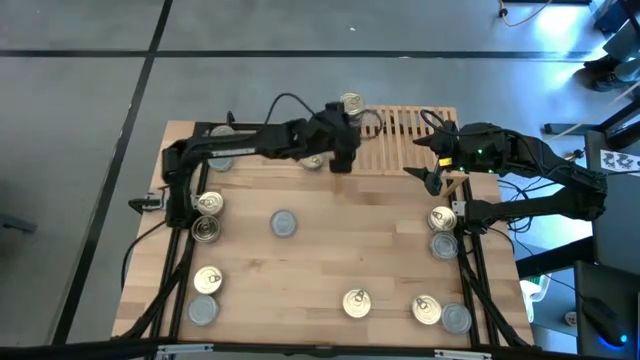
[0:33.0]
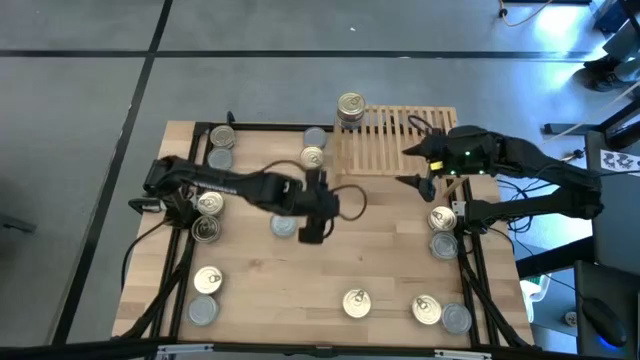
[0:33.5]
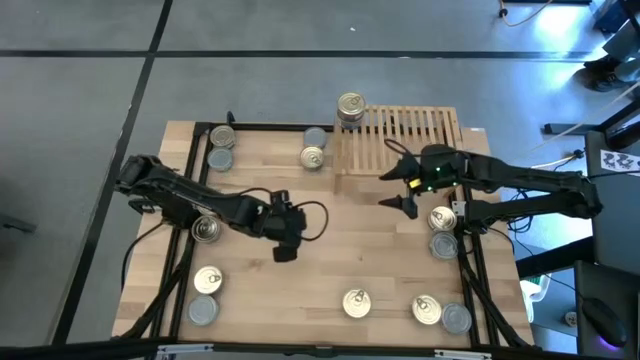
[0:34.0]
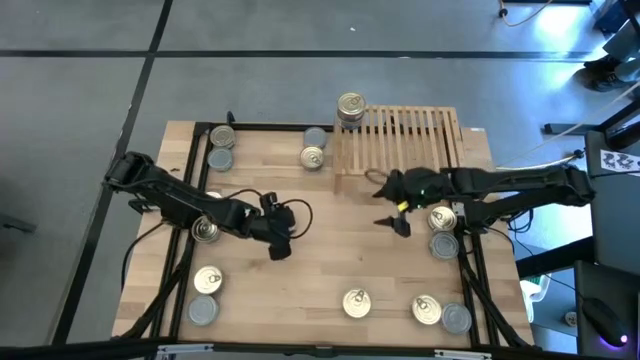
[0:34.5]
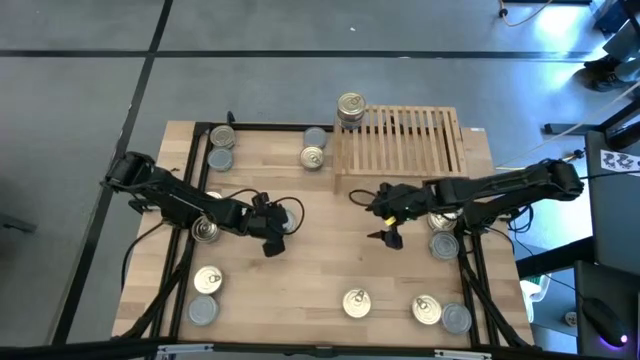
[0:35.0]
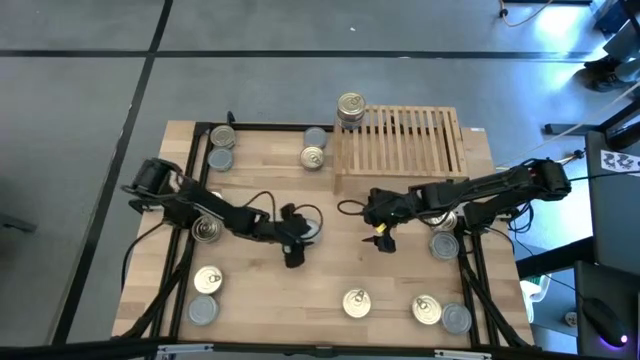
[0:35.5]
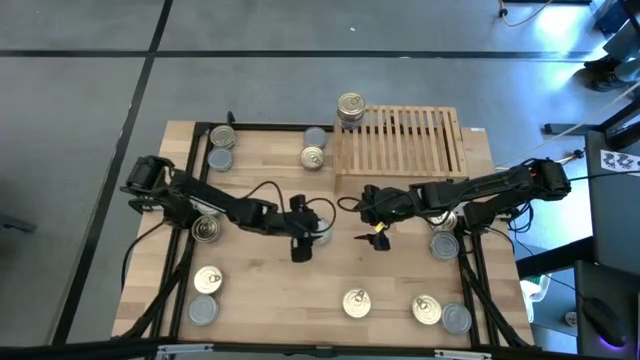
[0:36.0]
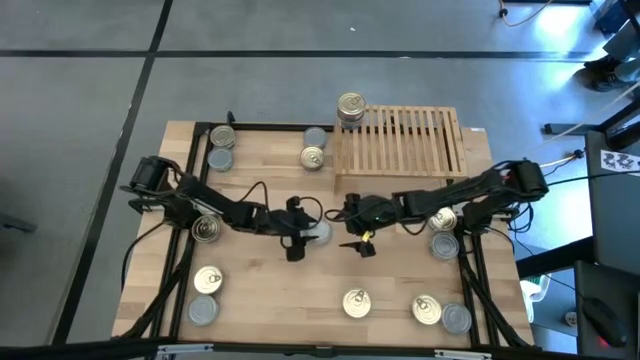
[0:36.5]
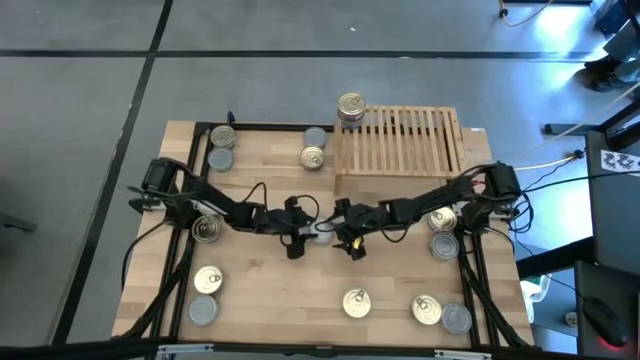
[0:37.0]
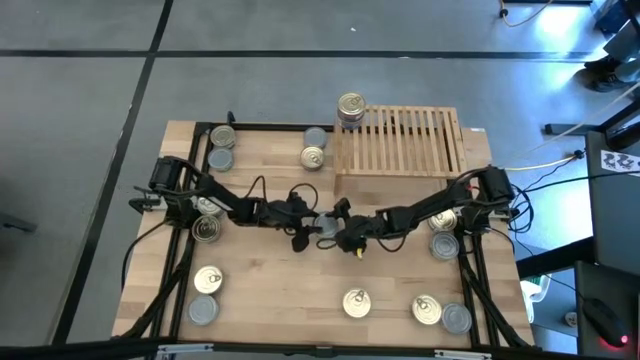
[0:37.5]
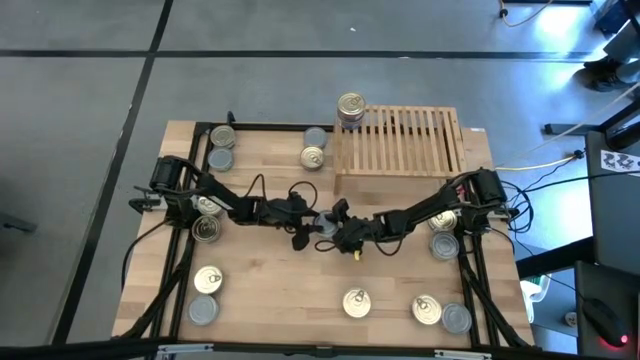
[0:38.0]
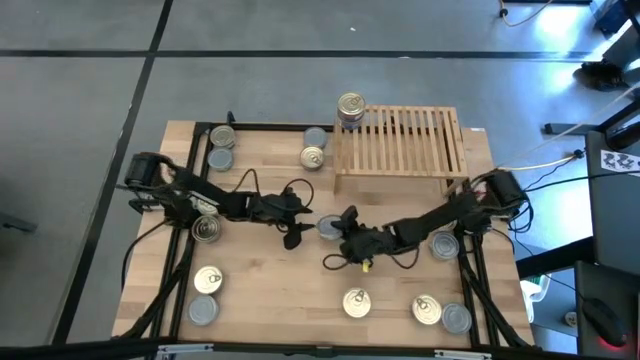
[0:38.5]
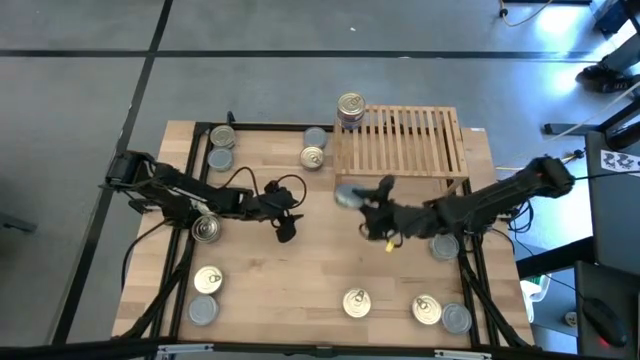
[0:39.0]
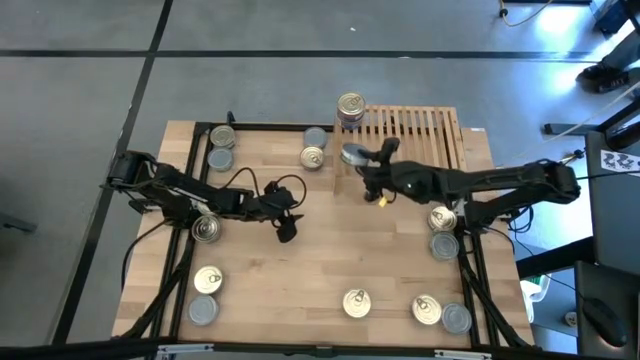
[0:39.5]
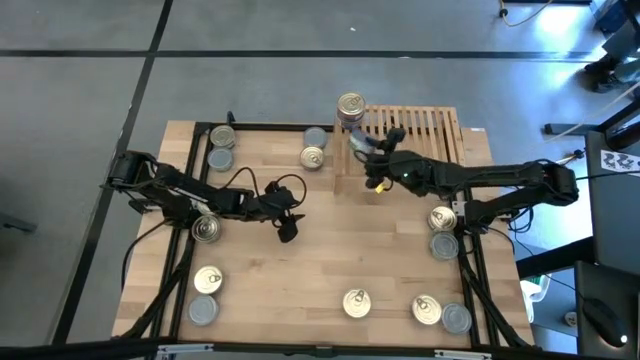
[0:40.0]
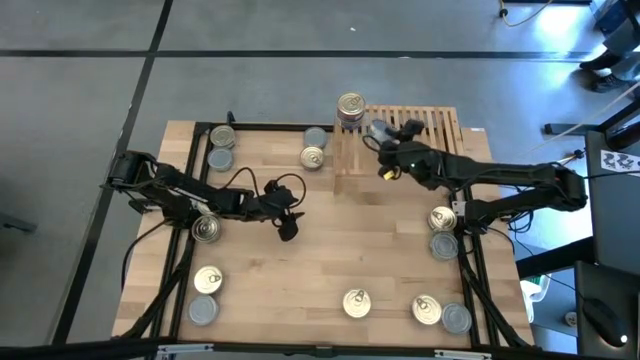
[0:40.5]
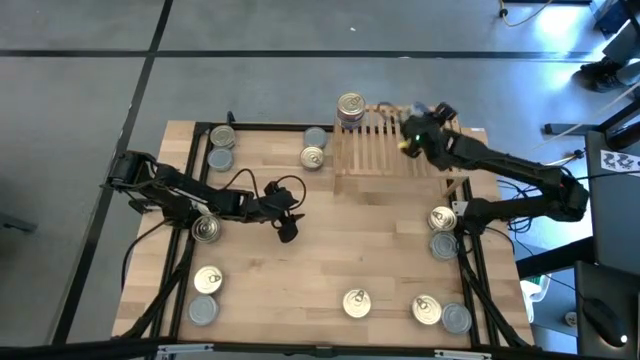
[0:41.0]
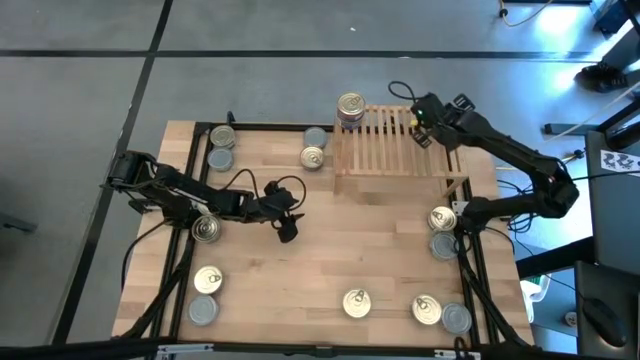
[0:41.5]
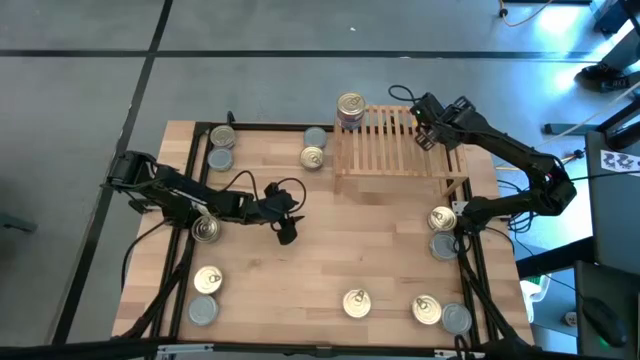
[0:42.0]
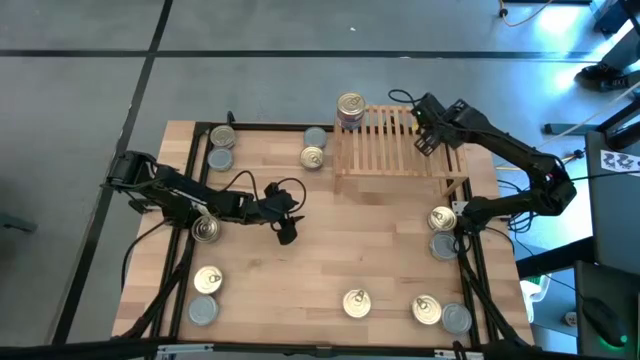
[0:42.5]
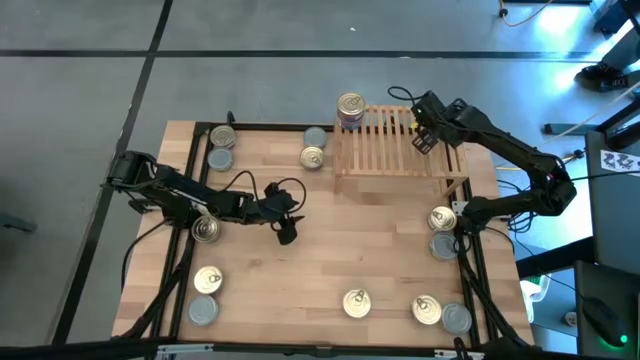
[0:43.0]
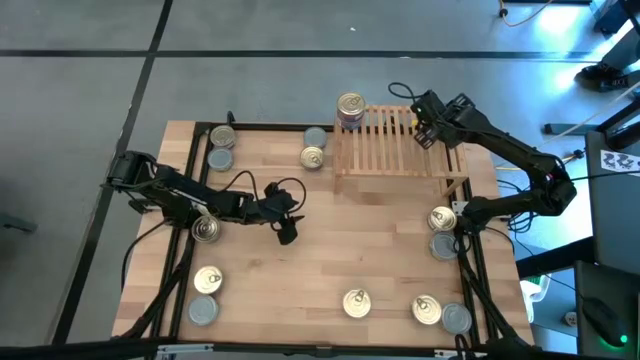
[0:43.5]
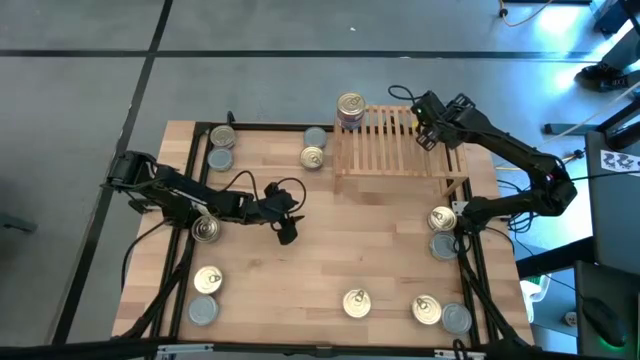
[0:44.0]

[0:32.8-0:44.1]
Task: Stack canned seafood by type on shelf
Put the green tuna can on the shelf

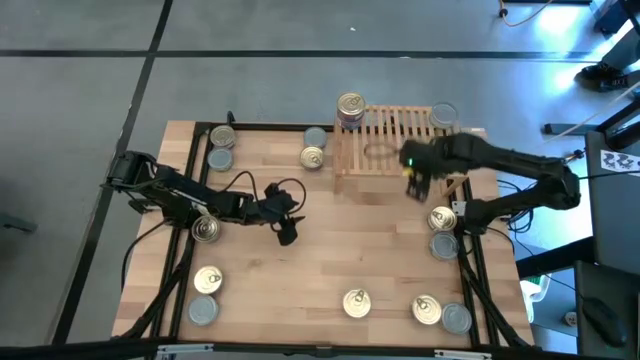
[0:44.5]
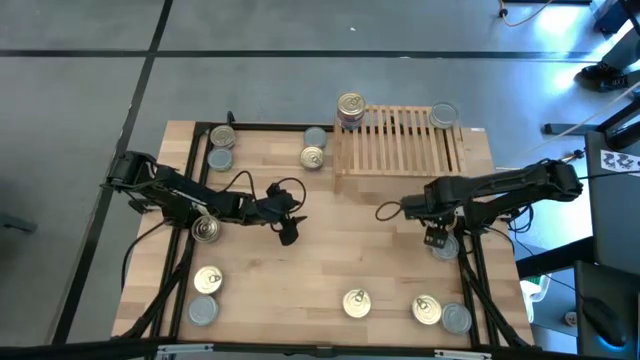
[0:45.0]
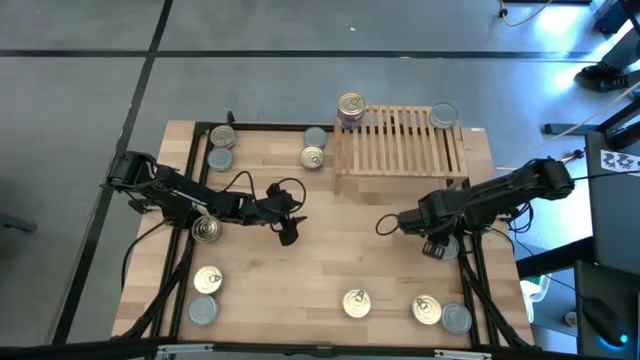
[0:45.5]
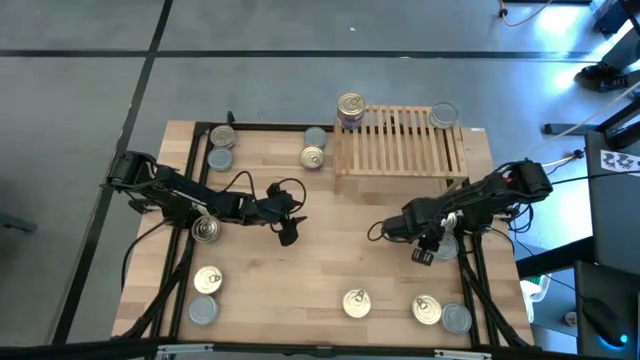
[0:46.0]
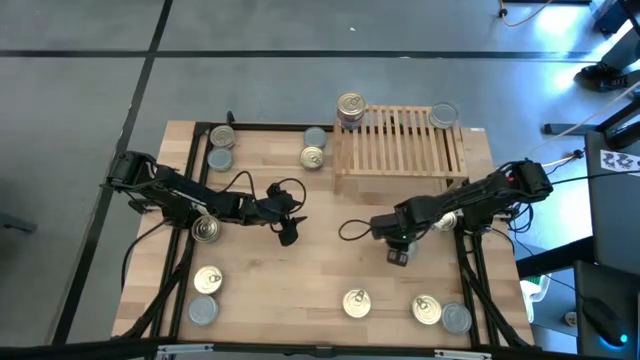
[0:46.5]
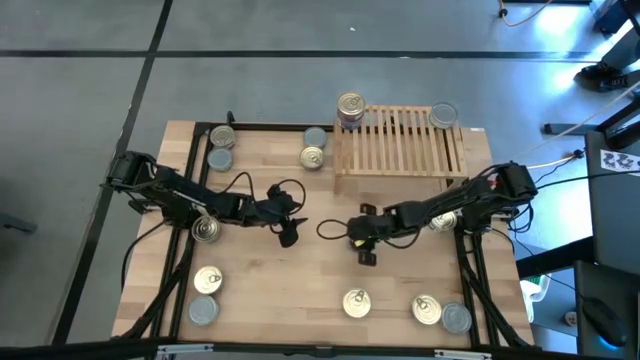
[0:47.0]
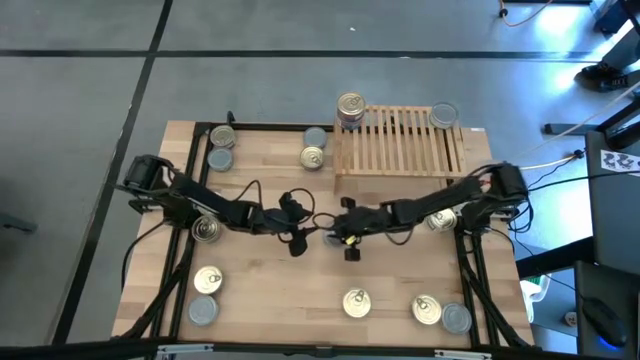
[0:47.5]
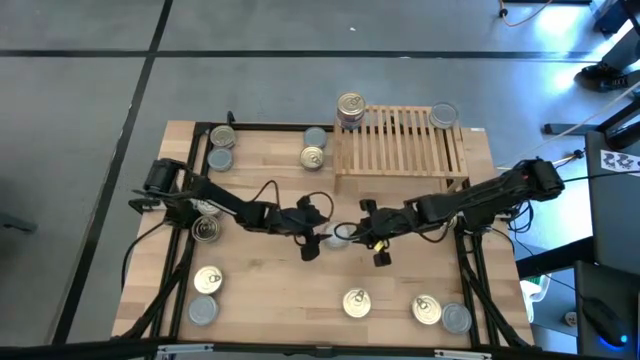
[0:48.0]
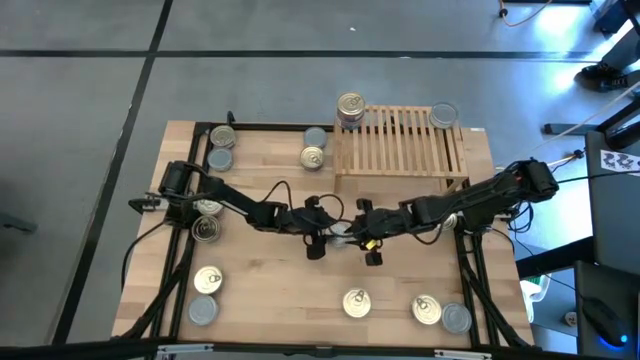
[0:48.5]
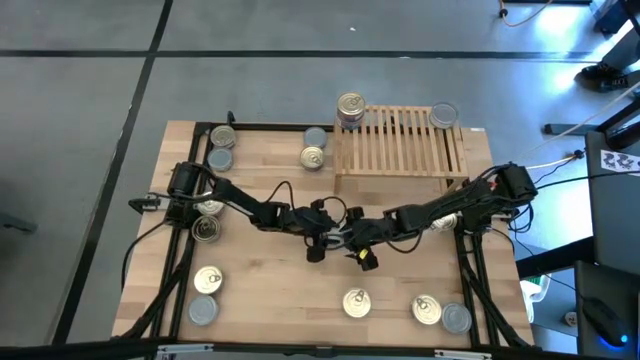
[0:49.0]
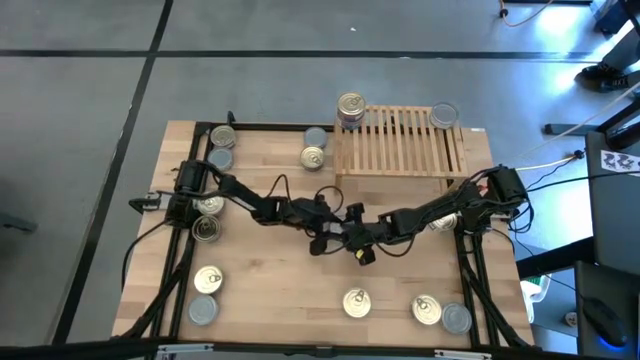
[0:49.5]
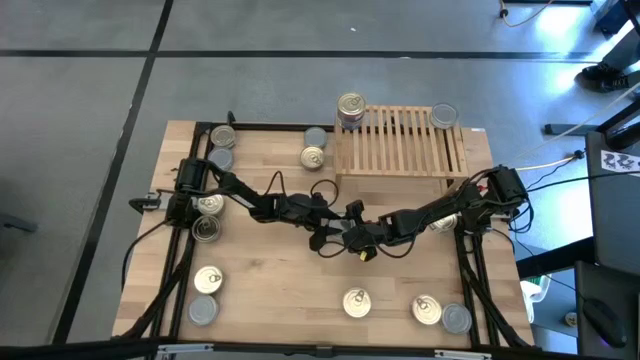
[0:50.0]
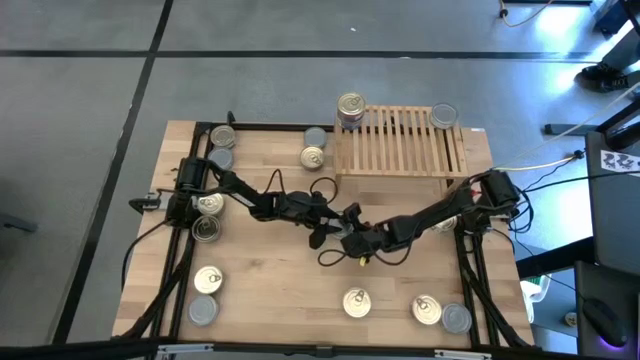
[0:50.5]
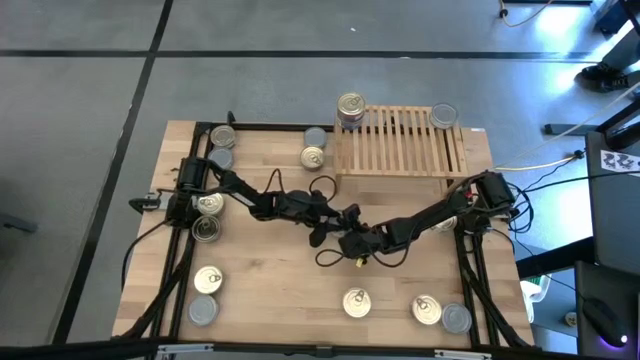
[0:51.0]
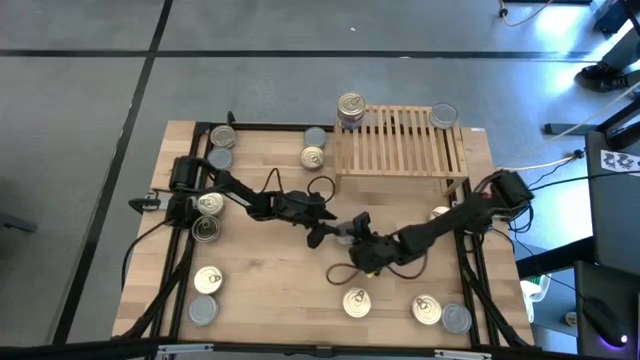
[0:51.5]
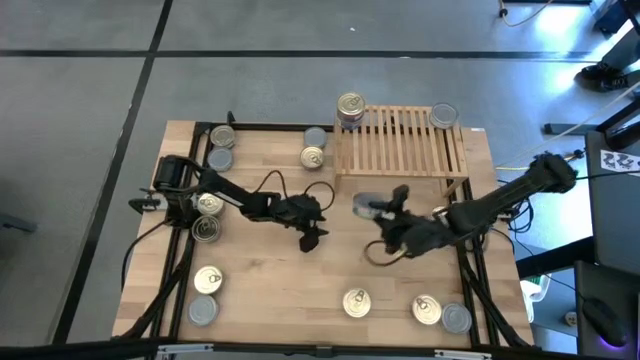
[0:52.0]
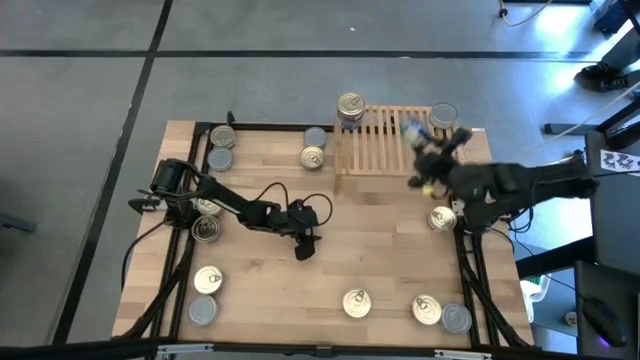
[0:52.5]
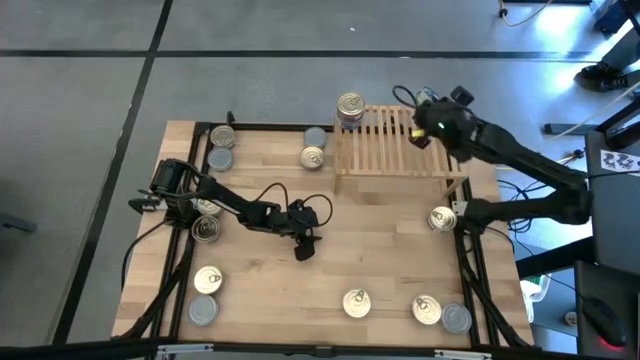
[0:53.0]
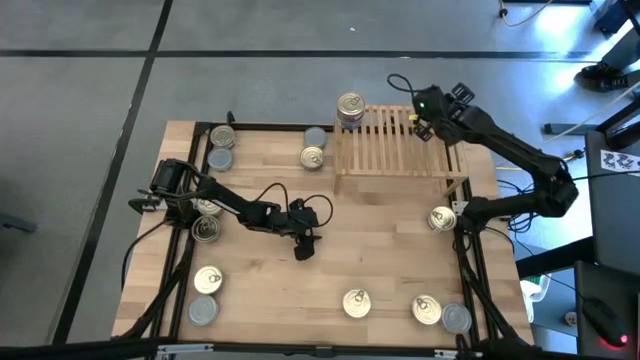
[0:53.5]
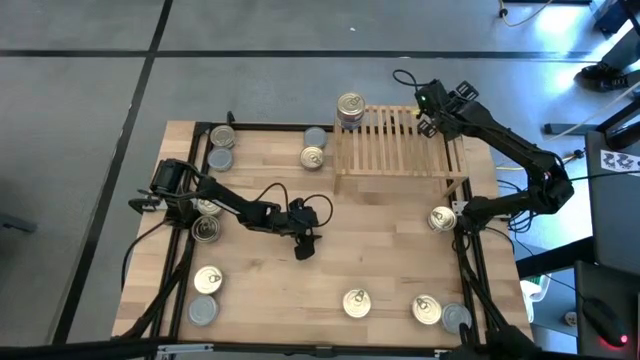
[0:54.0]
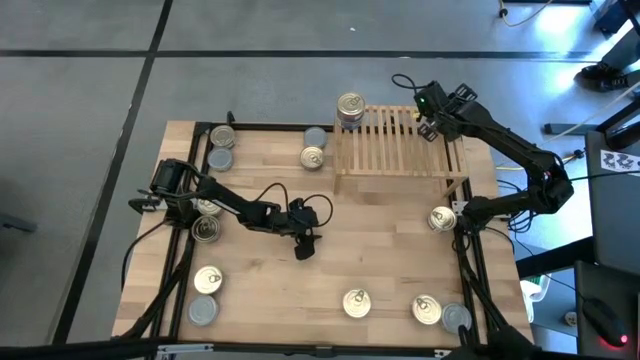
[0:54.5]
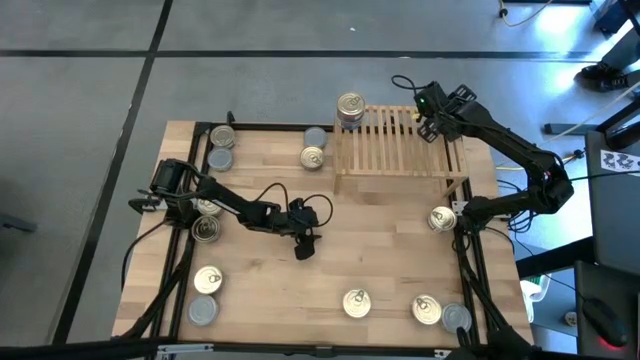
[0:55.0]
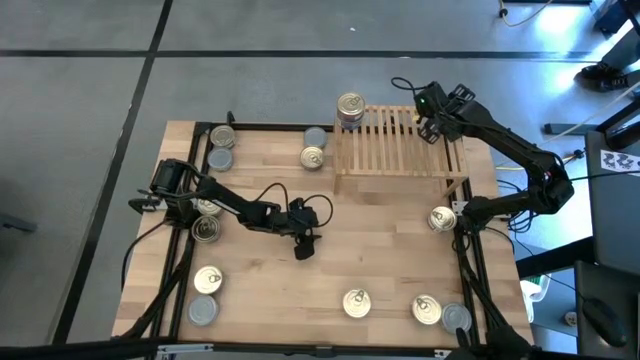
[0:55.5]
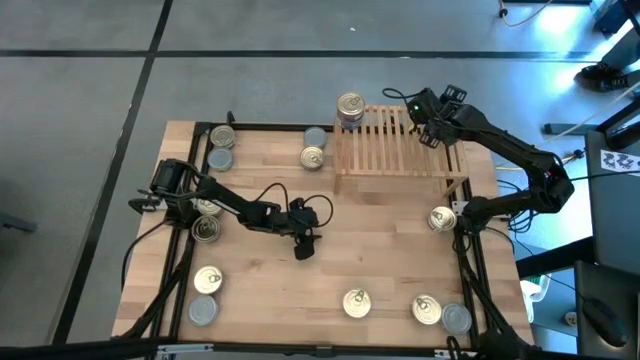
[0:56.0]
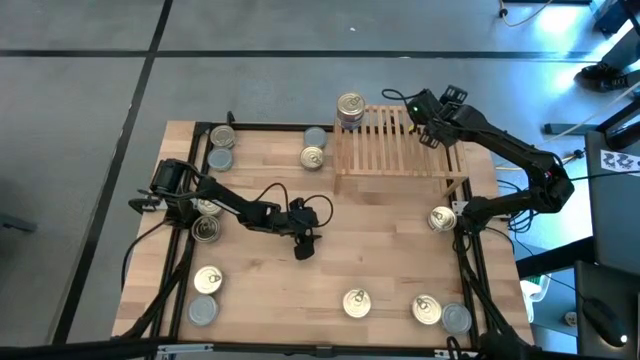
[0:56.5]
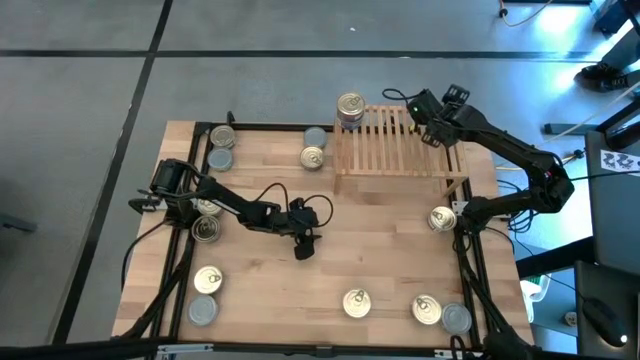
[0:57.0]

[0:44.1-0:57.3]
Stack the green tuna can on top of the green tuna can on the shelf
